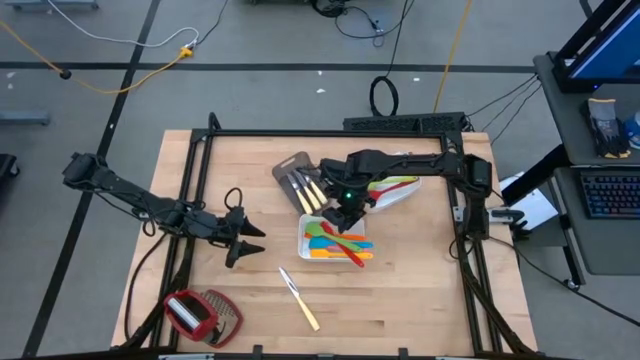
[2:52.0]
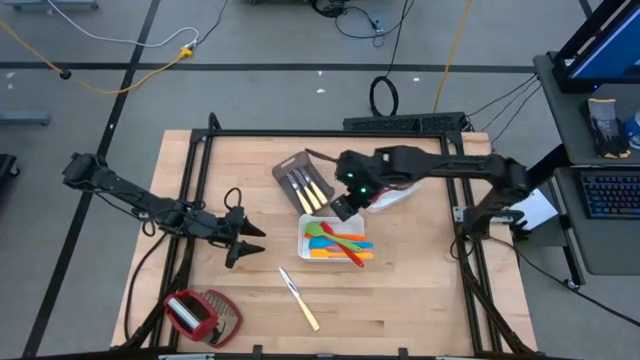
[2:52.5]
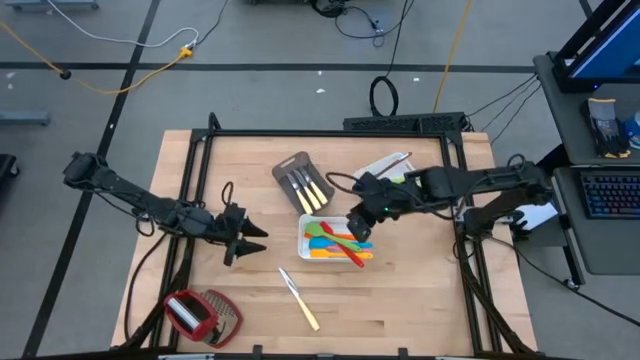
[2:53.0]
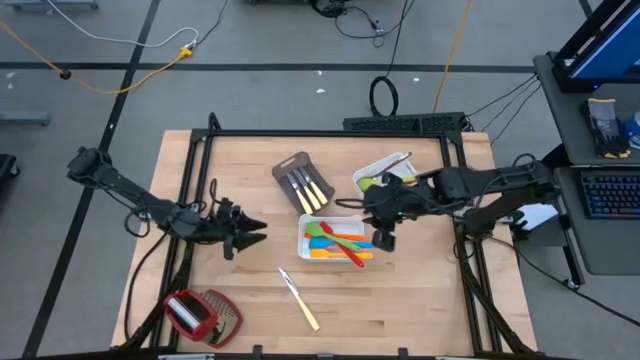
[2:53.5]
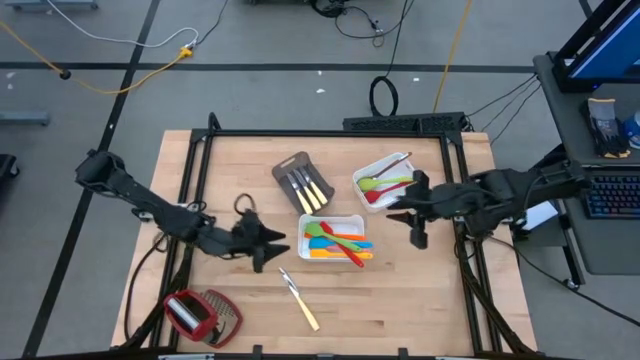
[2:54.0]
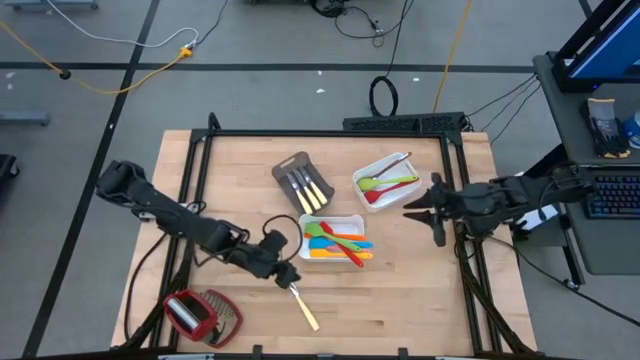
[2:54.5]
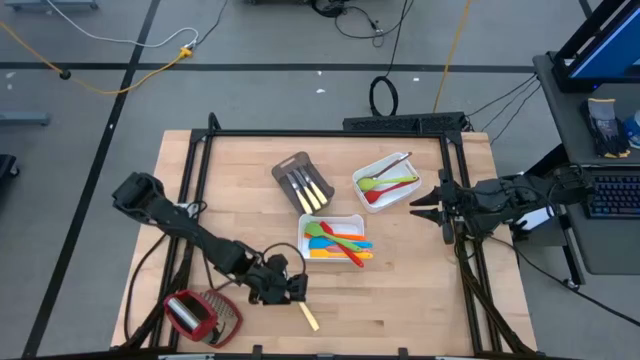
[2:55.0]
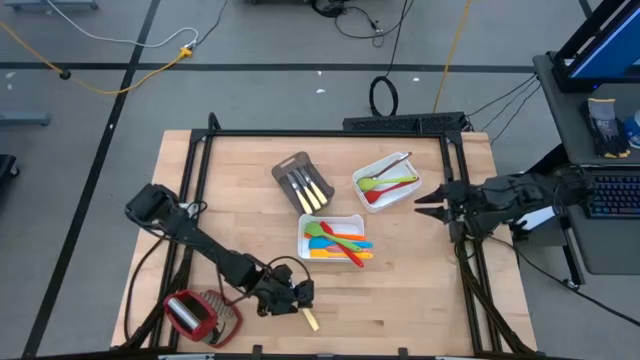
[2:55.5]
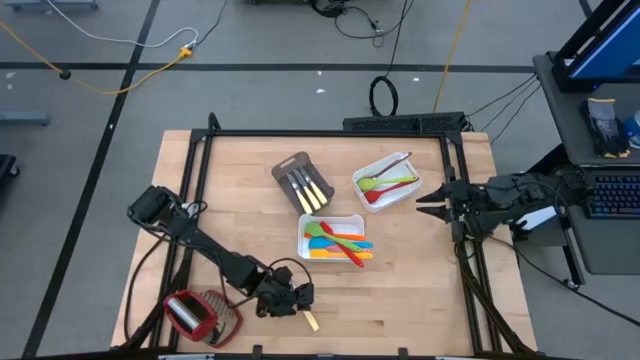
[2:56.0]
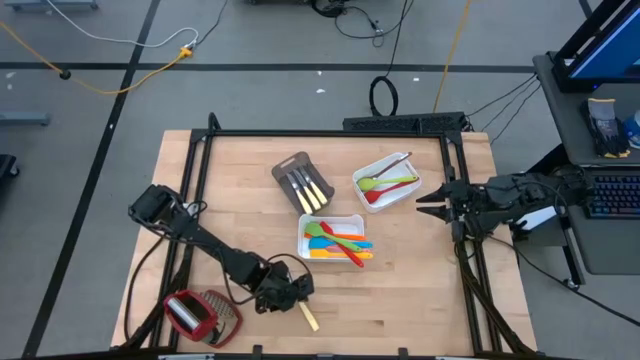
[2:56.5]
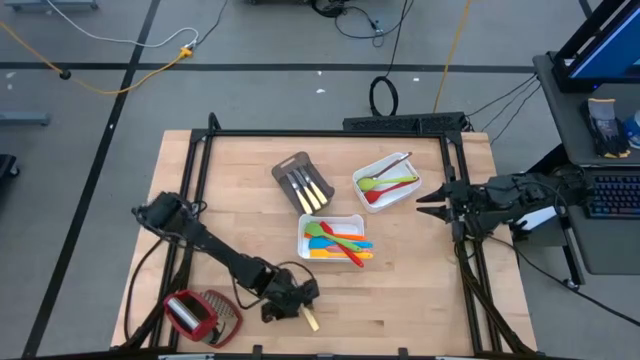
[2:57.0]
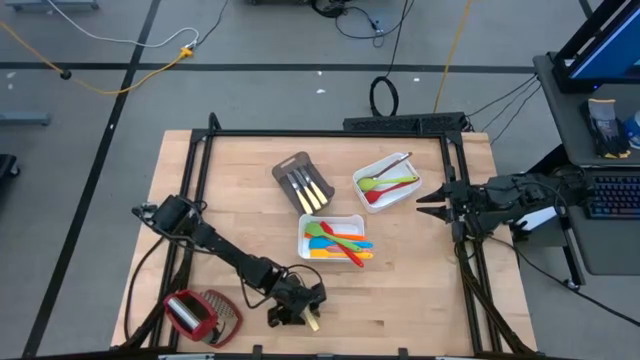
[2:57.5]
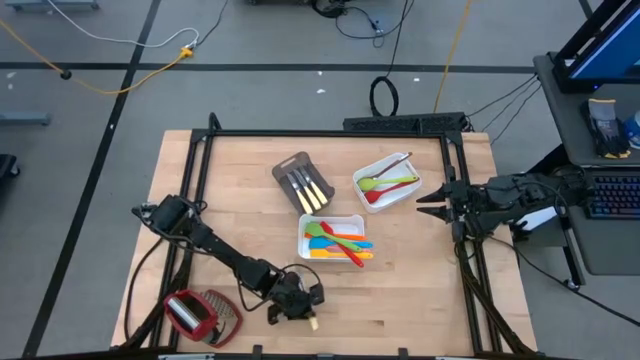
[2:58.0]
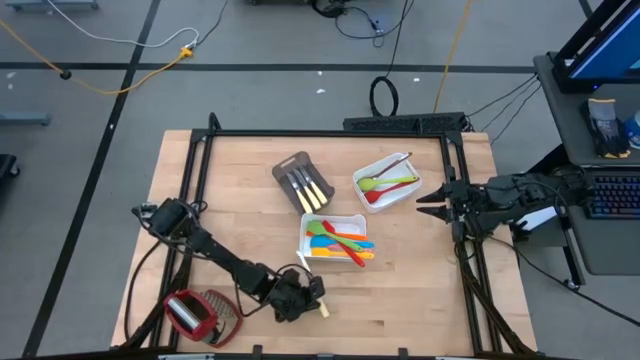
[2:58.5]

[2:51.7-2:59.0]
Task: Pick & Place Kitchen Items
Put the yellow knife into the black bin

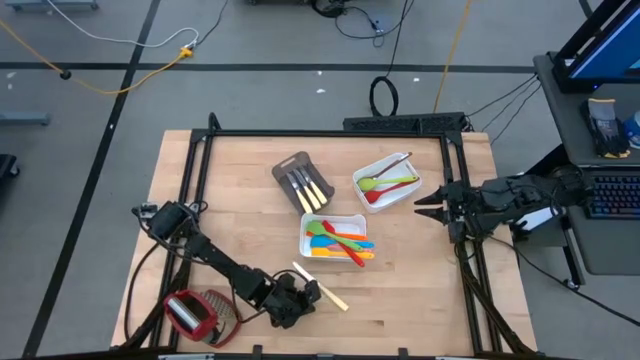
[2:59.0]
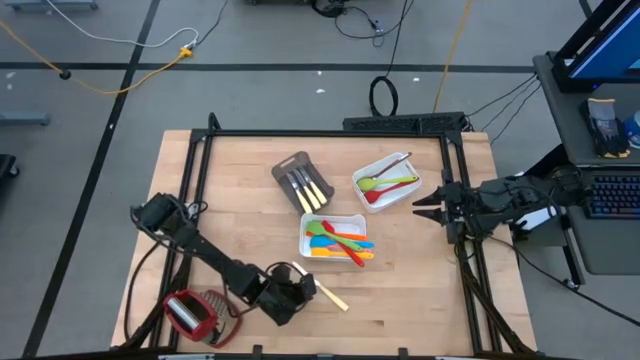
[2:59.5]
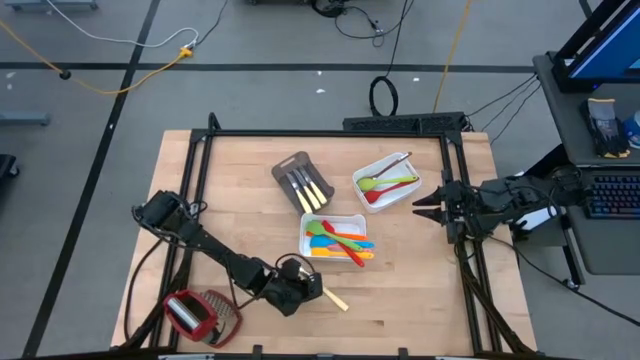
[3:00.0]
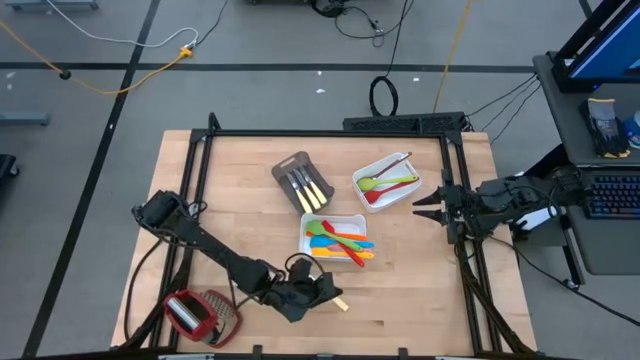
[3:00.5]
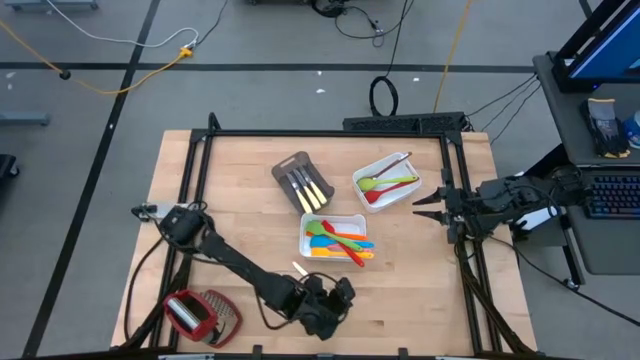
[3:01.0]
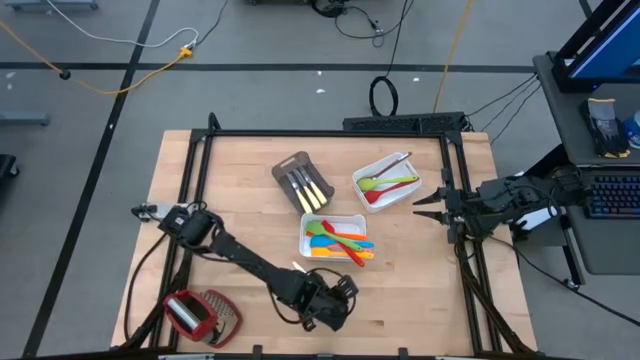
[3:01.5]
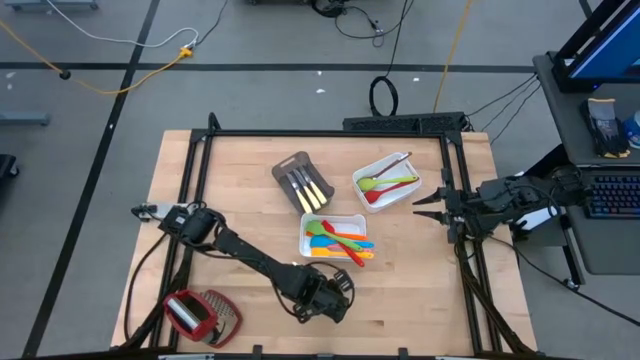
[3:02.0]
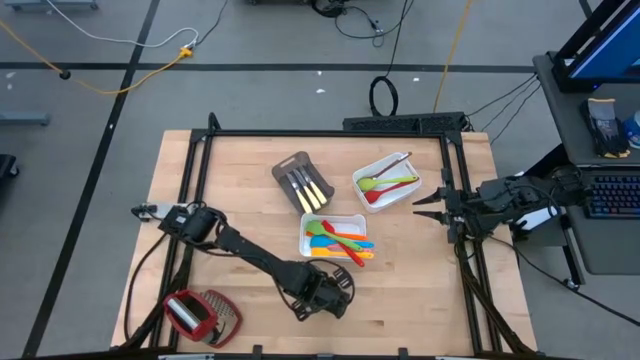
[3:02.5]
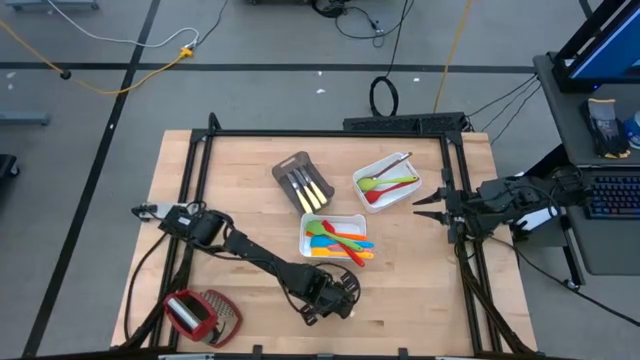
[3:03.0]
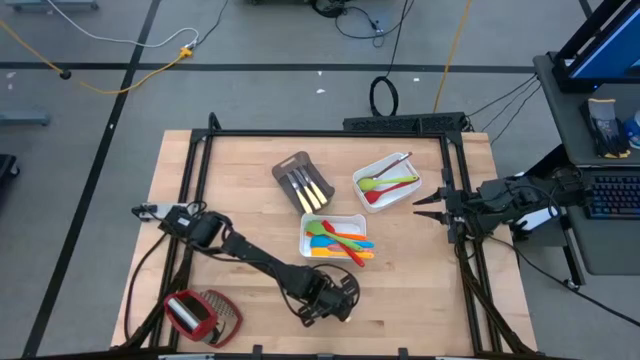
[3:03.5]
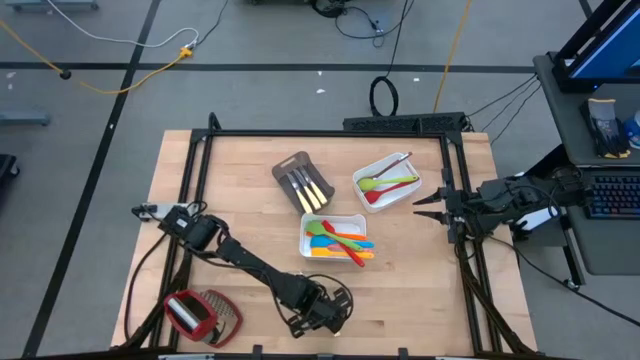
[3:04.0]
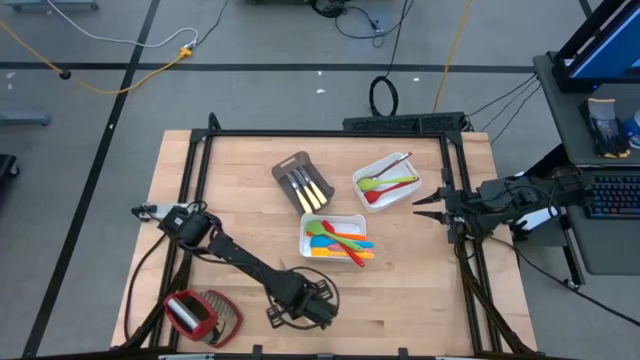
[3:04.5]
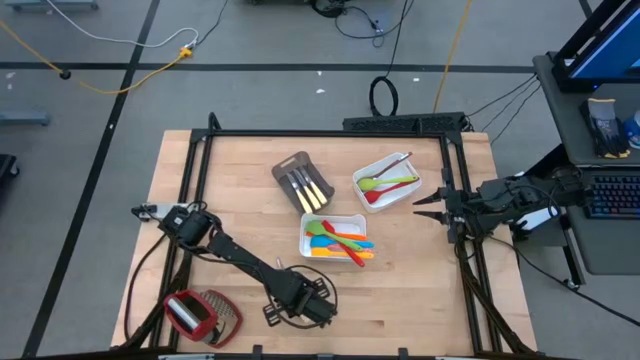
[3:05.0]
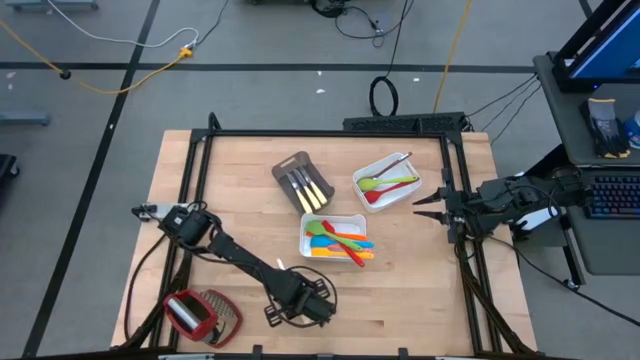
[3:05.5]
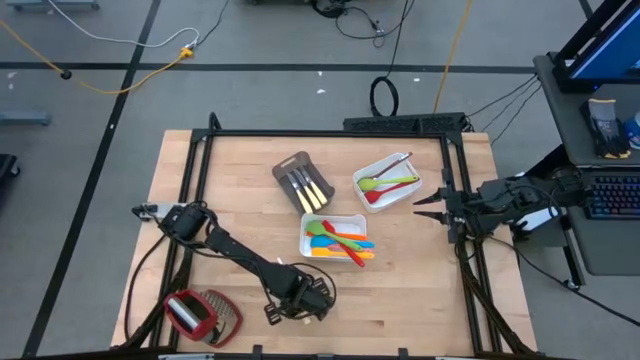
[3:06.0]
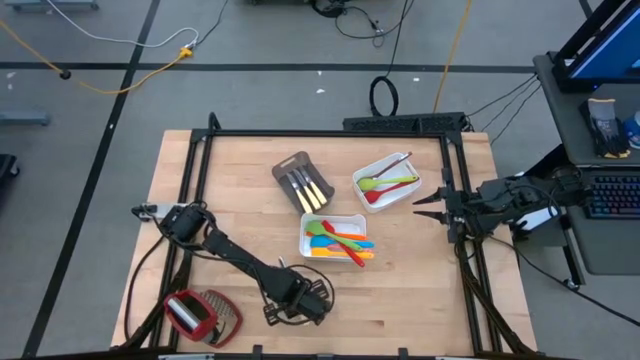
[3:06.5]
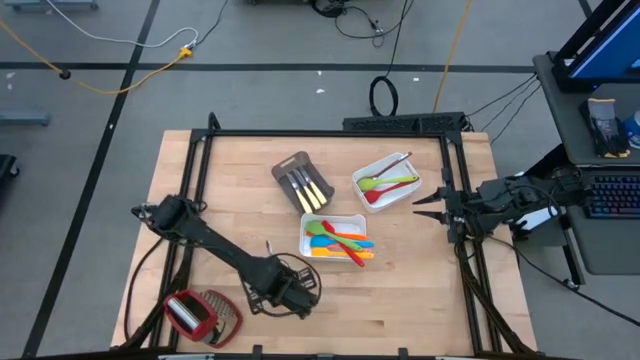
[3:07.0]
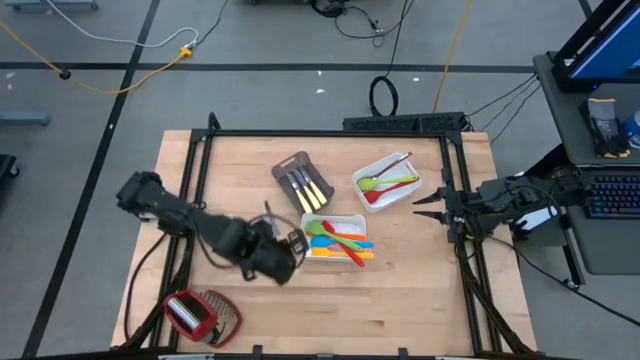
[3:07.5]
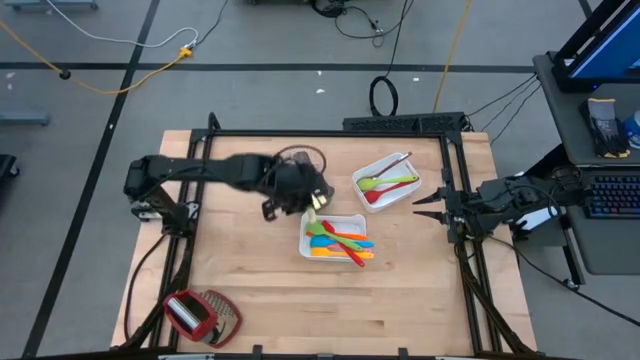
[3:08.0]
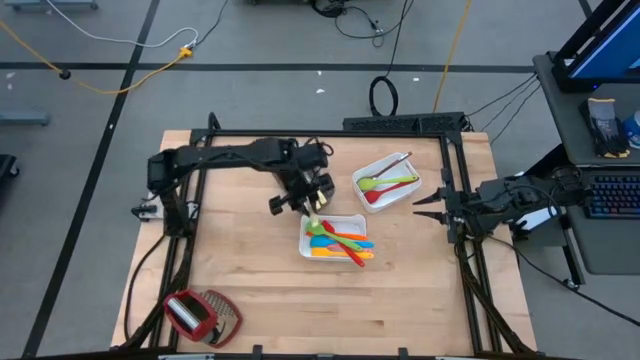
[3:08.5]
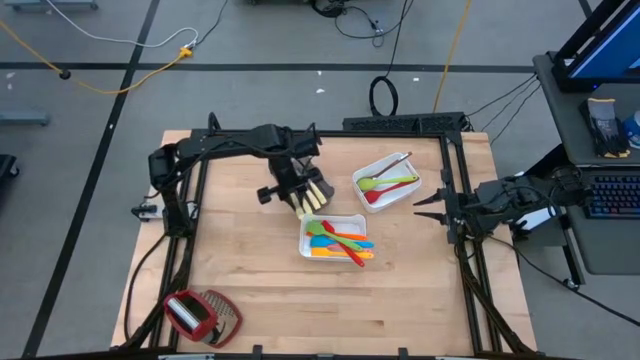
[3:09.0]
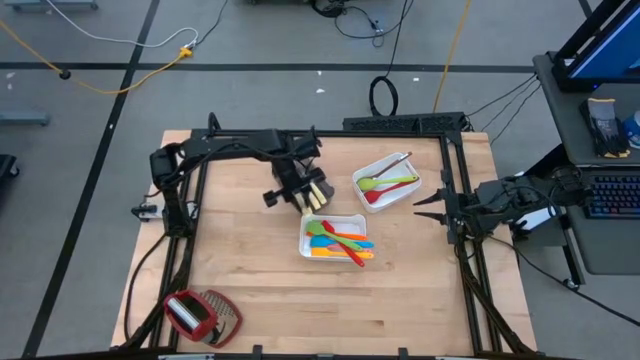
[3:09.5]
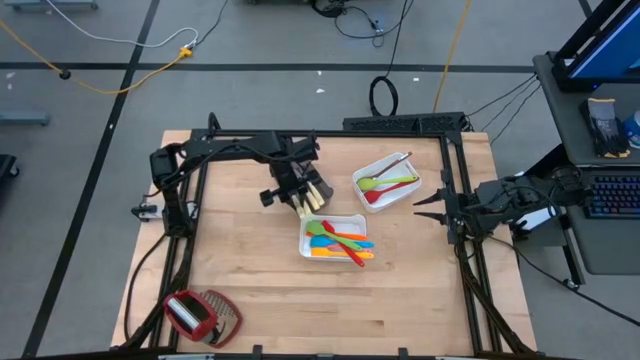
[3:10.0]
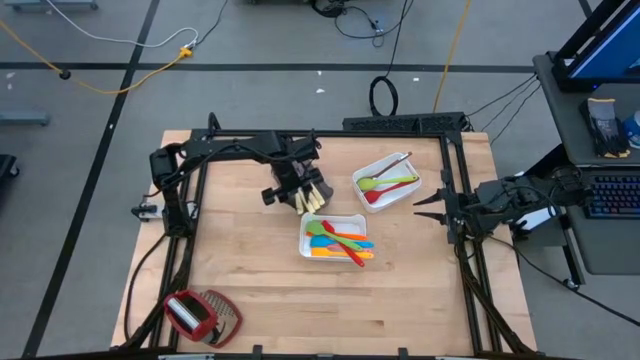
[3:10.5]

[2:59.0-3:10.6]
Put the yellow knife into the black bin

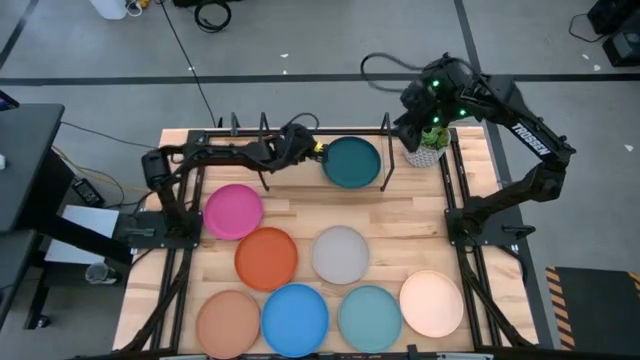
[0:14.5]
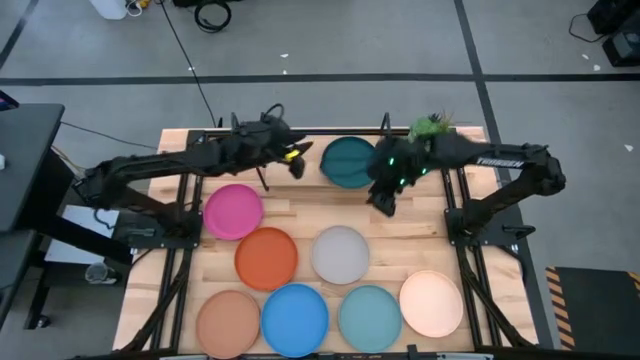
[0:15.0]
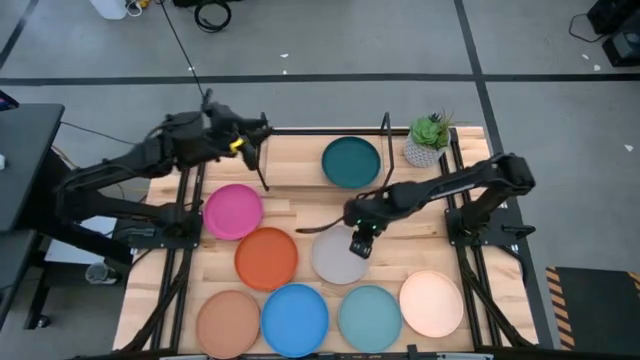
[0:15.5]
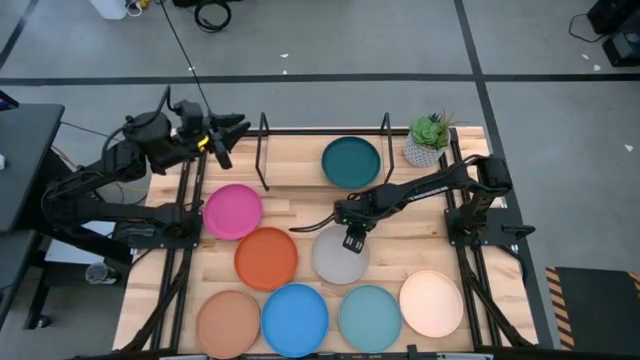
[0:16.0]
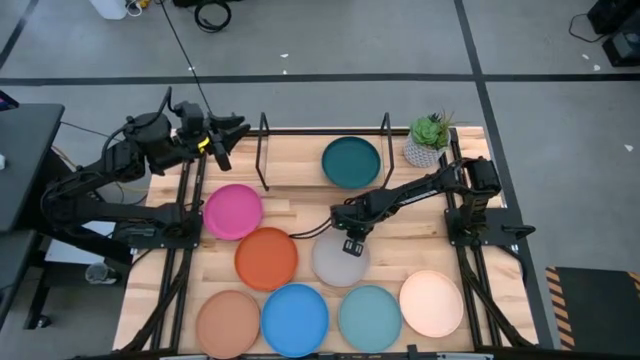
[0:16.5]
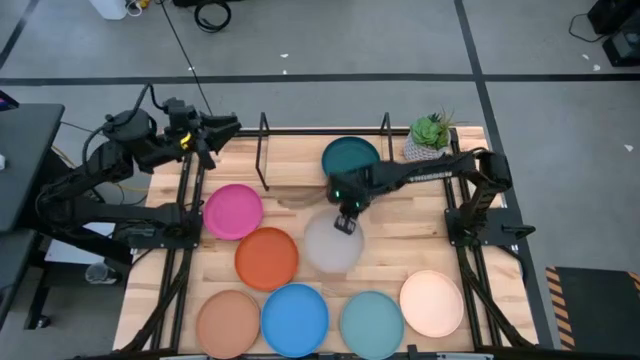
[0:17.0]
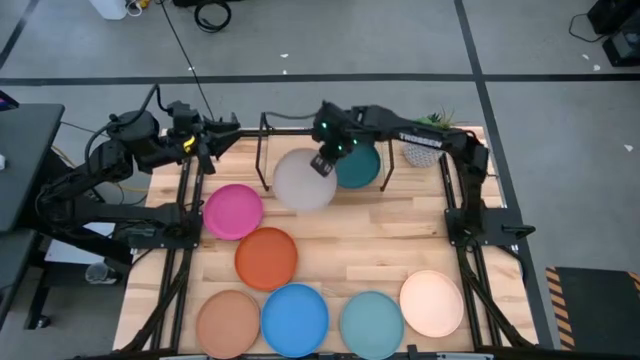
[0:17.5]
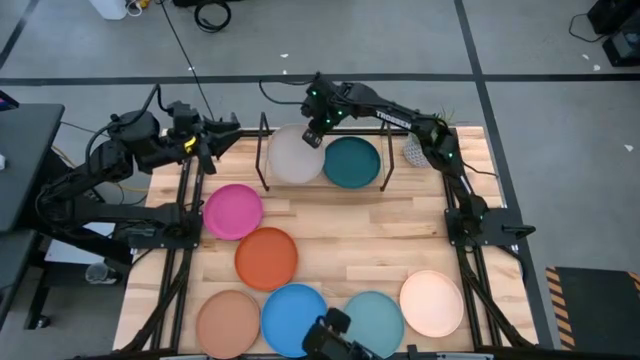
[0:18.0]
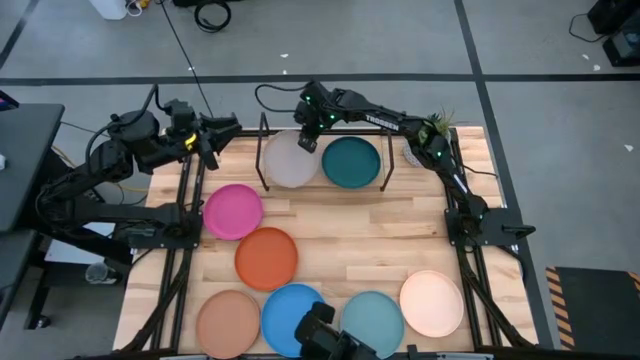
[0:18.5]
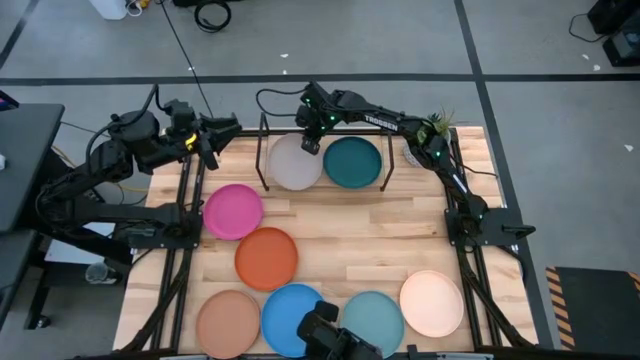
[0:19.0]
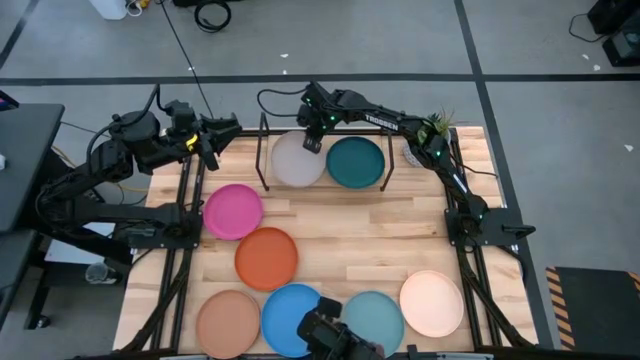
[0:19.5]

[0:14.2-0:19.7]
Task: Place and stack plates onto a shelf
Put the gray plate on the shelf
